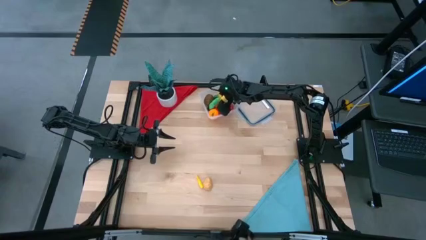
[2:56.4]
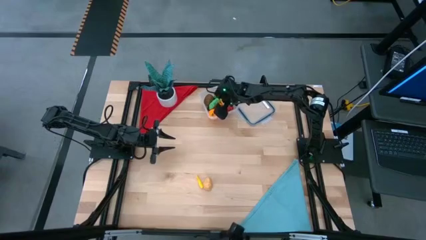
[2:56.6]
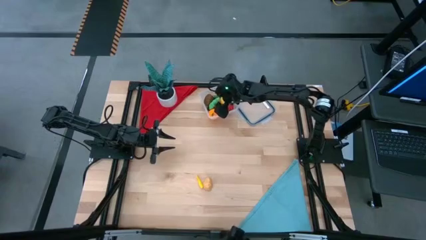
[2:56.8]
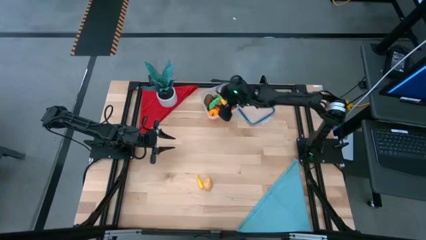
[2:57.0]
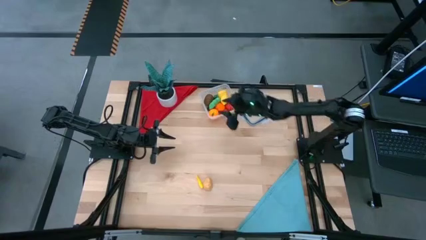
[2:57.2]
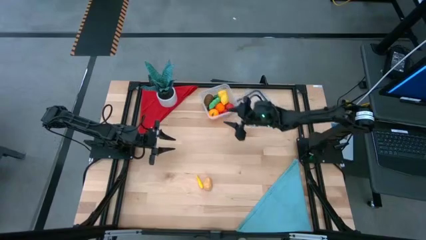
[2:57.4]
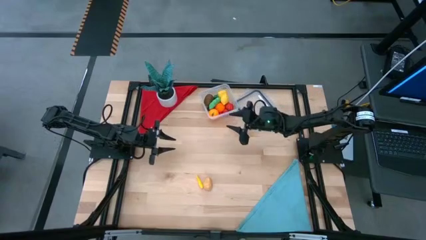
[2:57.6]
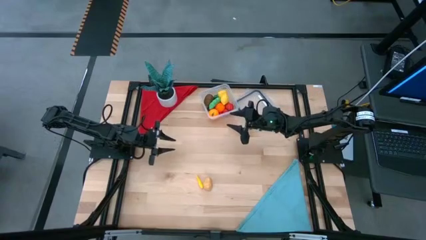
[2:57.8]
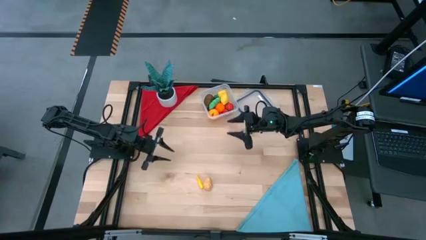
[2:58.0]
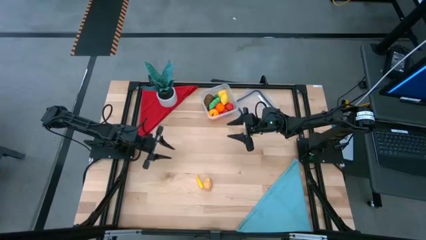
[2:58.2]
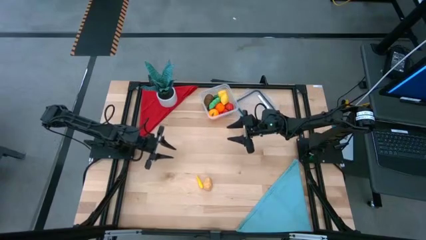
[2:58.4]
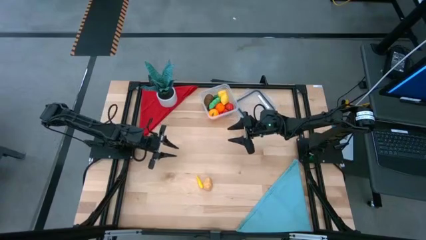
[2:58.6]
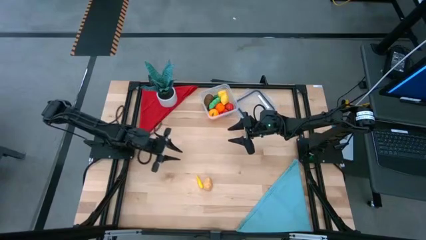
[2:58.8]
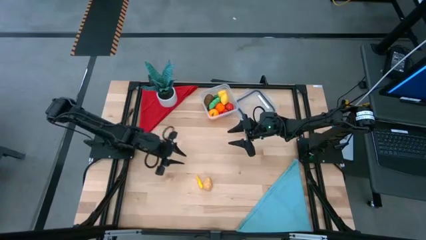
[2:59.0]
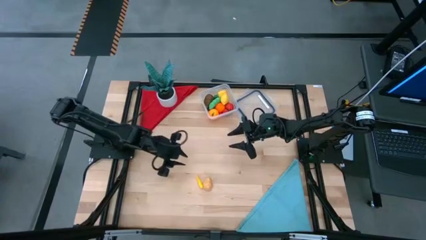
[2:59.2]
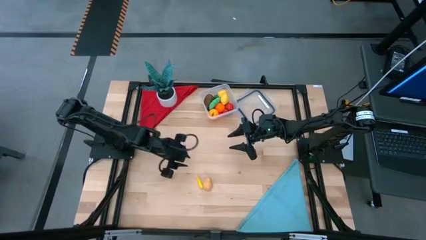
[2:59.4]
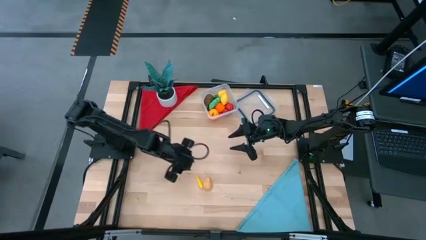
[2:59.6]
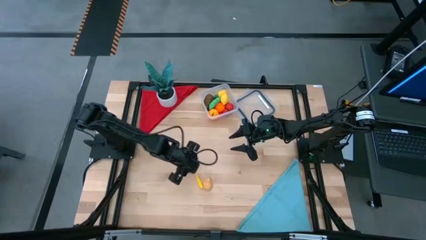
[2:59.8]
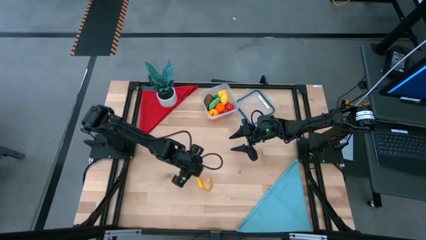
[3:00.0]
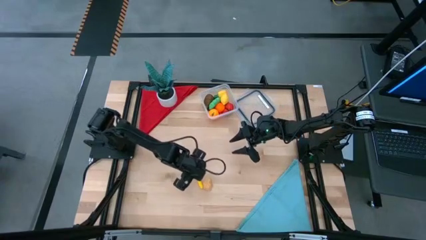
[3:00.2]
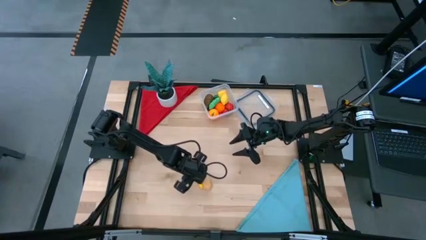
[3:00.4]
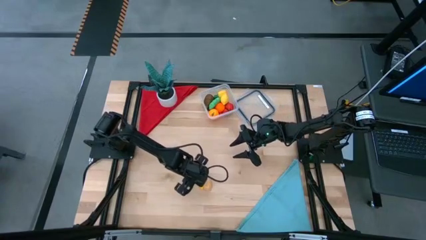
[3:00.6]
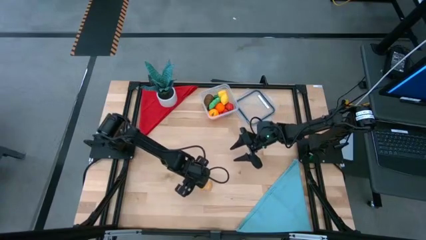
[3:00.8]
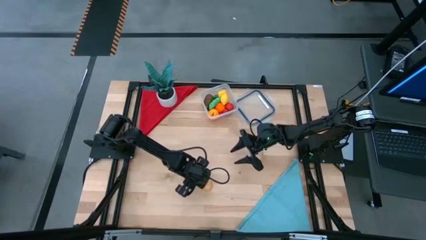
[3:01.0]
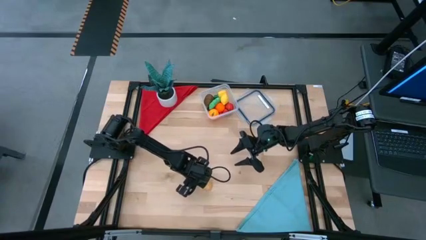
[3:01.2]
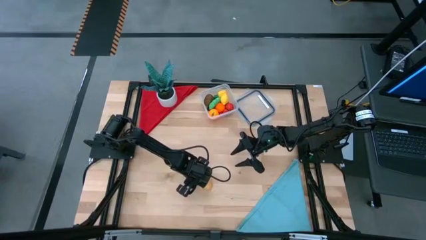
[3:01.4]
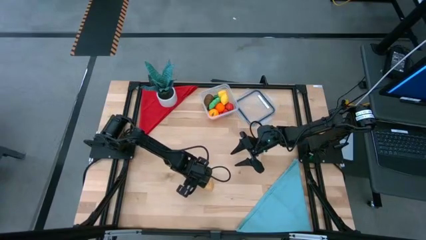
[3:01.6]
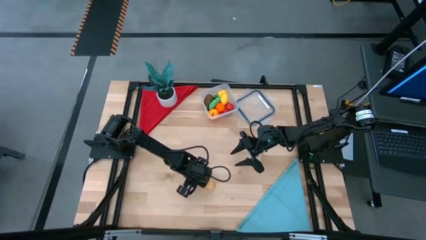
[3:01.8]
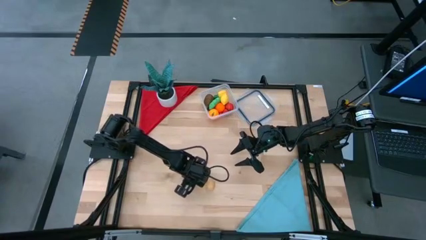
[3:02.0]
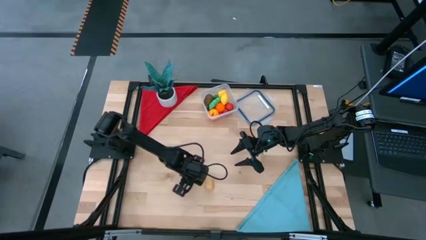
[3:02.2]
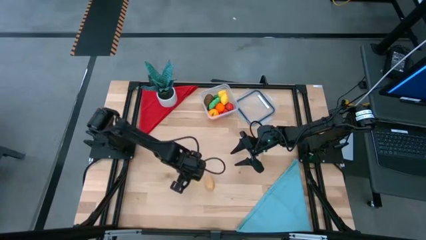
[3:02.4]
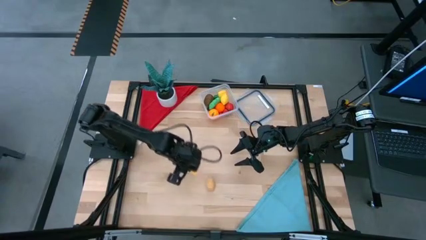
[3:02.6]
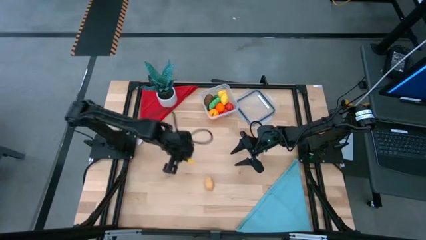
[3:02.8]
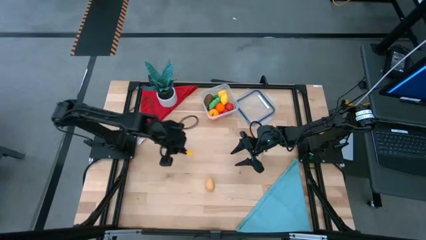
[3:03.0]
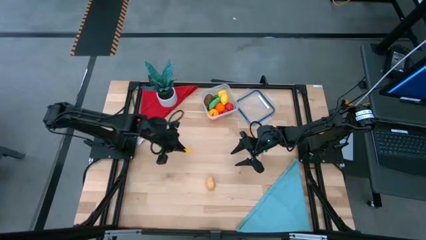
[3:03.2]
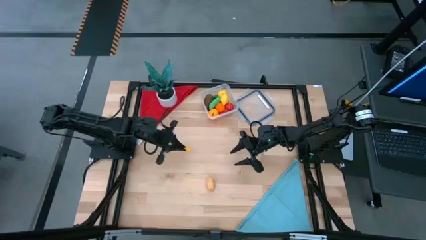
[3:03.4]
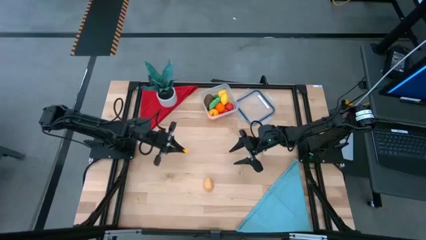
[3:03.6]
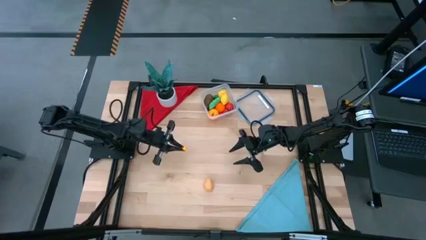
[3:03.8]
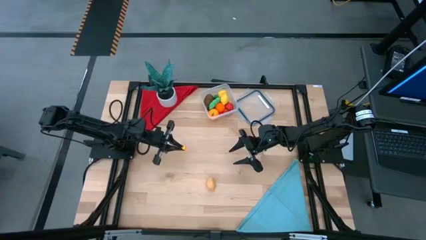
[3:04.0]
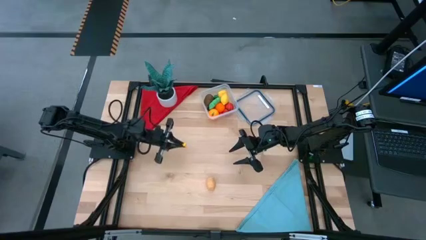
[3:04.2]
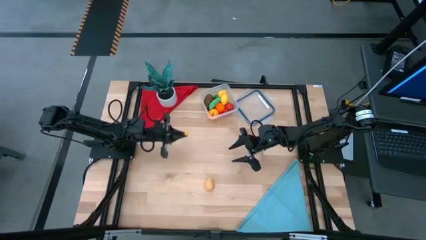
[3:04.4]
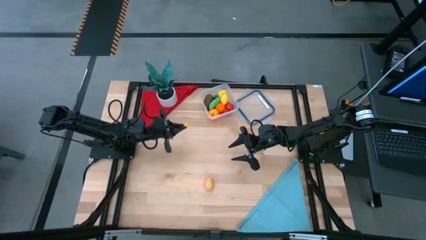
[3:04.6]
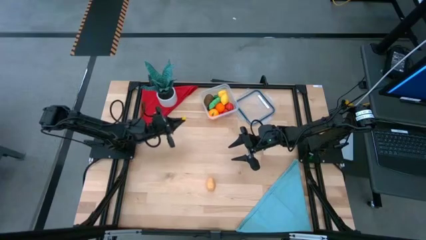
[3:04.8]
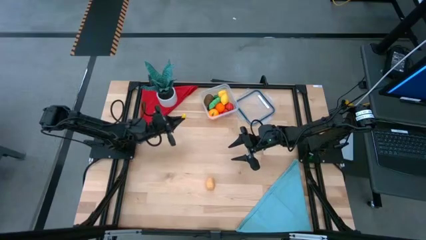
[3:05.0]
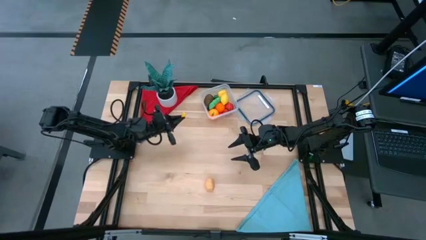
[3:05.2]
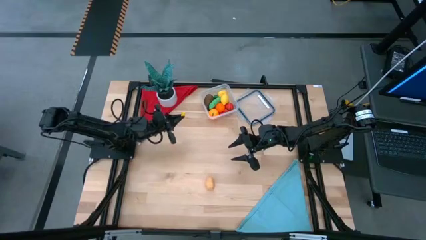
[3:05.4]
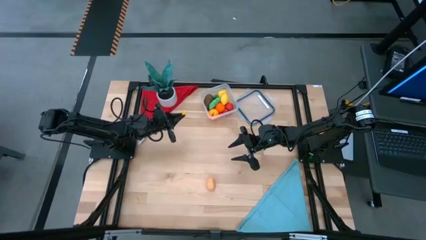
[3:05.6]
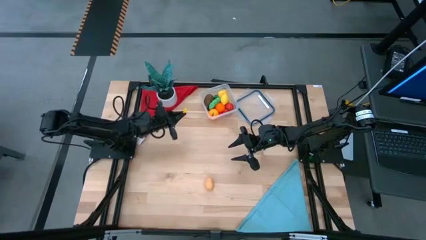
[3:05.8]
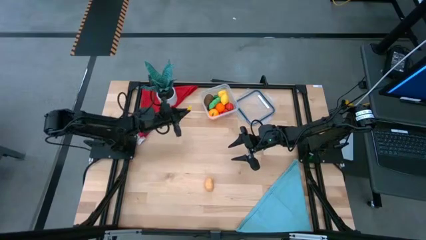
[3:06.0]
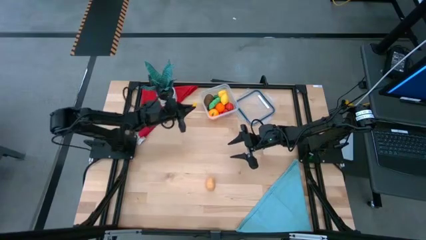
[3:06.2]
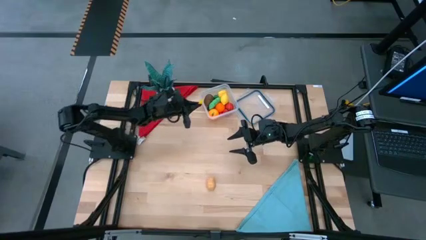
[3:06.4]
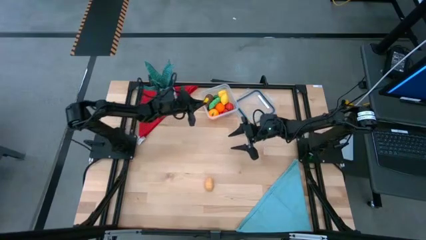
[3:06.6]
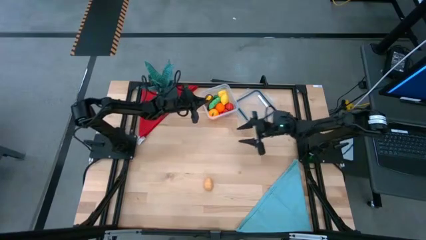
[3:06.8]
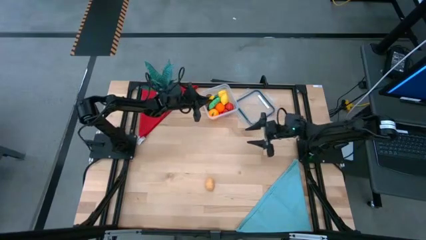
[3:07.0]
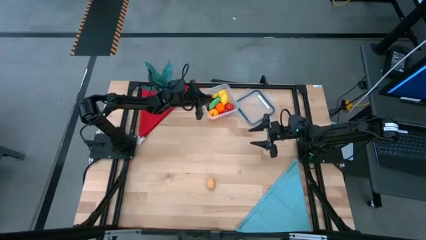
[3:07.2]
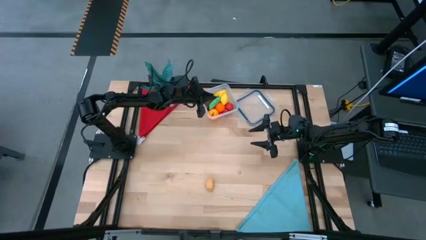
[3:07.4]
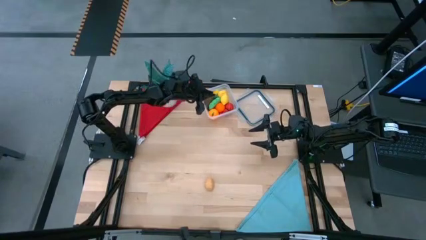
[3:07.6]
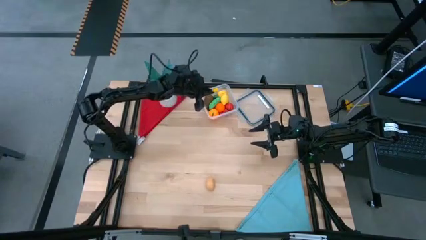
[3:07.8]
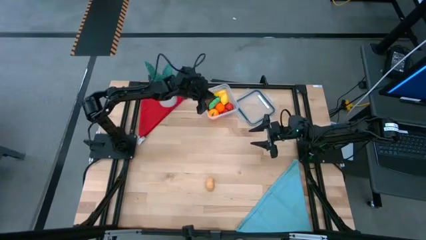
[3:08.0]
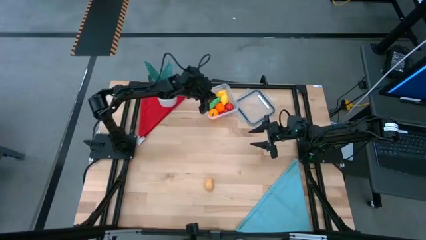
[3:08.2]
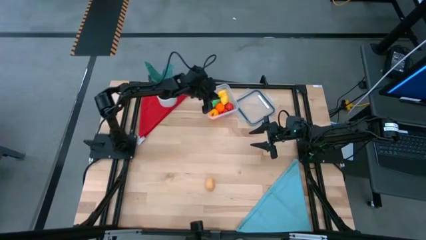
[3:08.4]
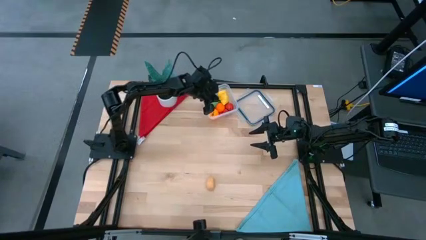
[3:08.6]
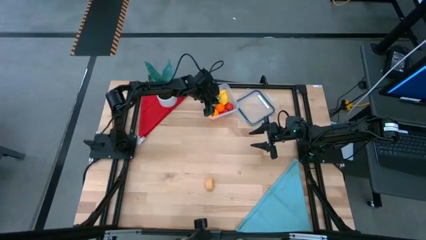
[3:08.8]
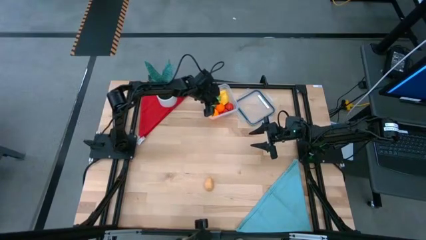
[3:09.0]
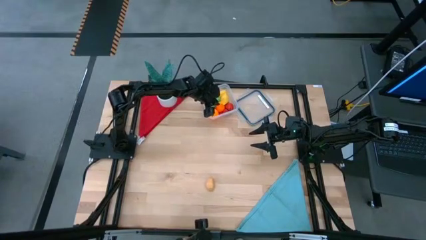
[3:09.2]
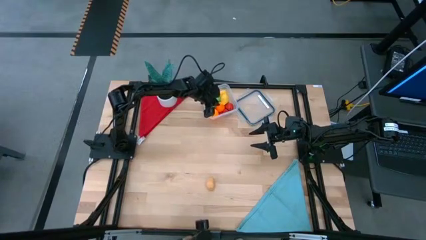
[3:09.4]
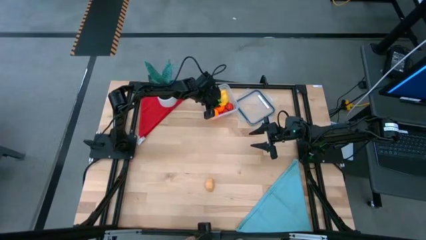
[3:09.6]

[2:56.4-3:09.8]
Task: Pick and placing Produce into tupperware
Put the yellow corn into the transparent container

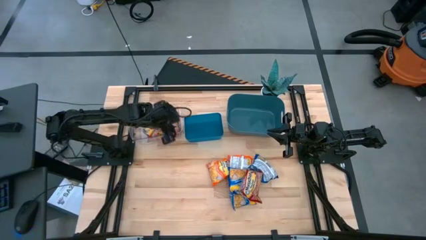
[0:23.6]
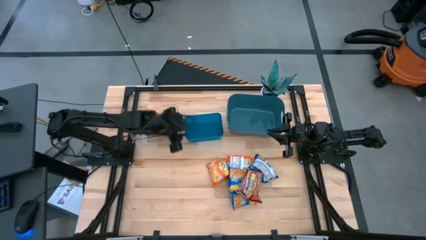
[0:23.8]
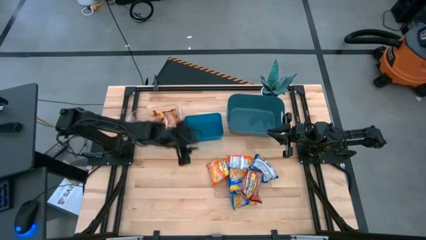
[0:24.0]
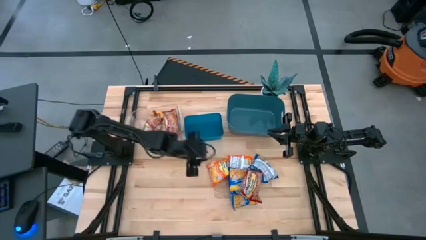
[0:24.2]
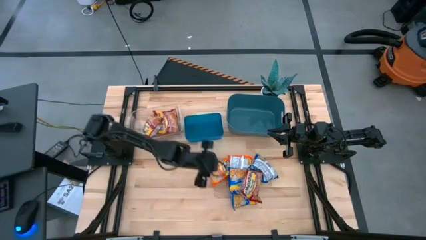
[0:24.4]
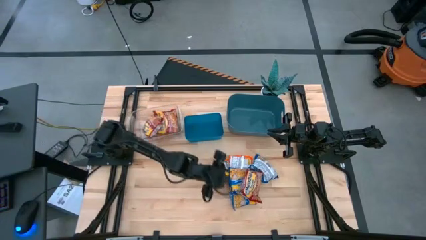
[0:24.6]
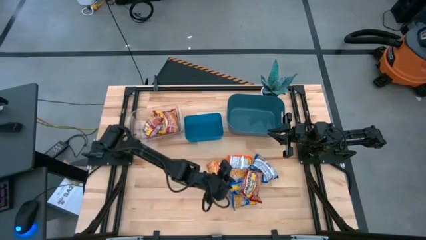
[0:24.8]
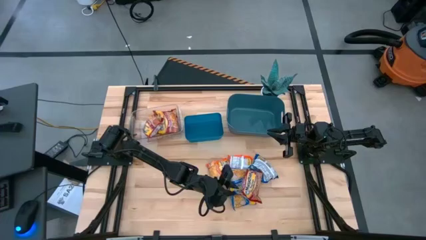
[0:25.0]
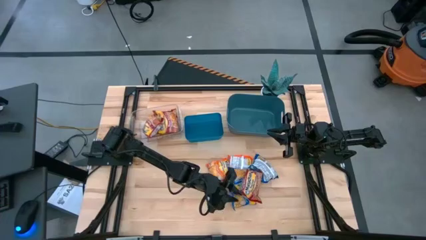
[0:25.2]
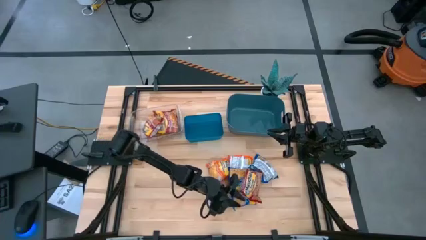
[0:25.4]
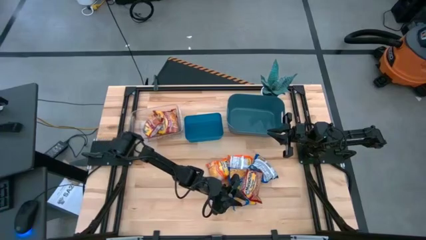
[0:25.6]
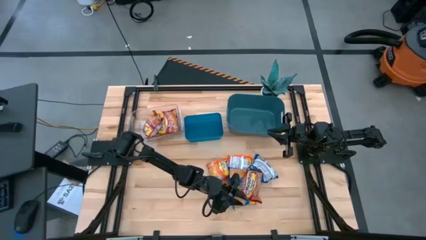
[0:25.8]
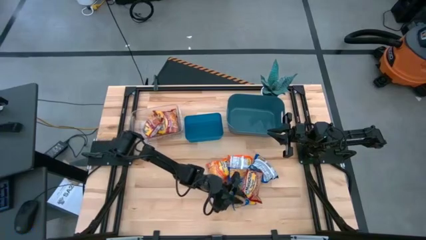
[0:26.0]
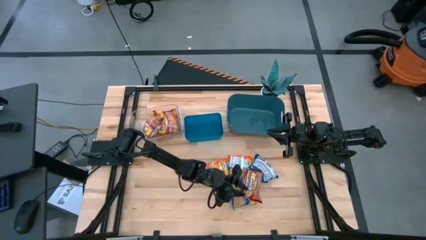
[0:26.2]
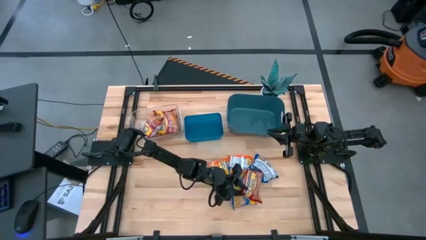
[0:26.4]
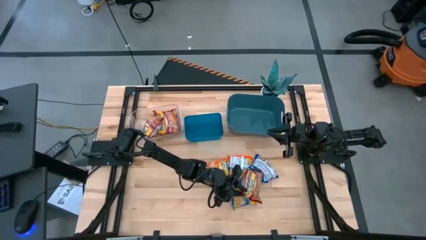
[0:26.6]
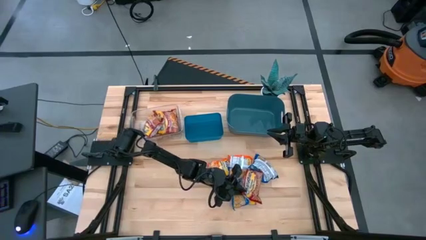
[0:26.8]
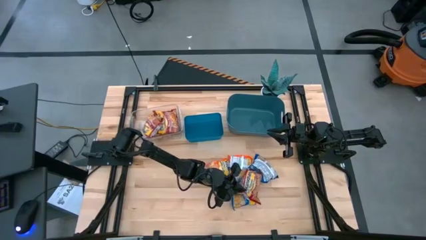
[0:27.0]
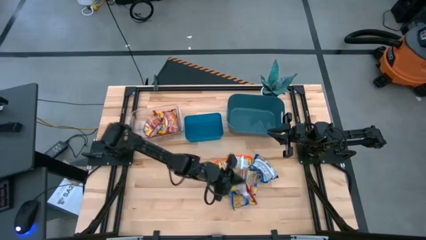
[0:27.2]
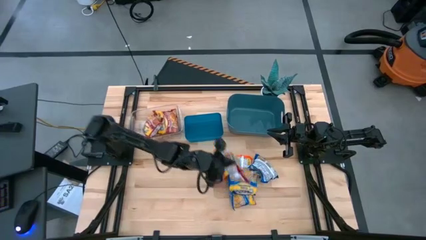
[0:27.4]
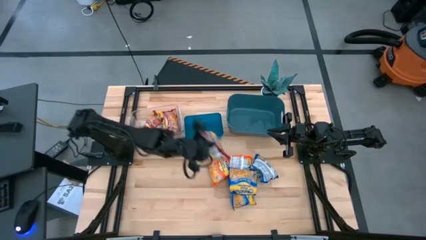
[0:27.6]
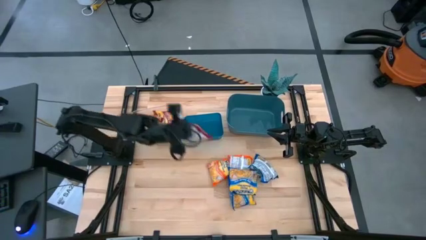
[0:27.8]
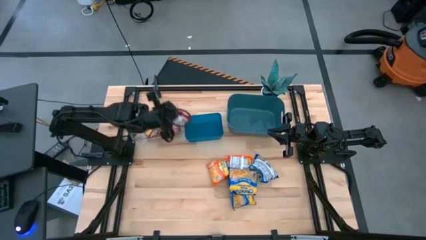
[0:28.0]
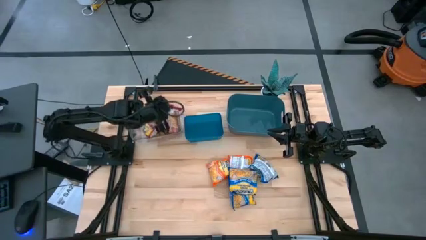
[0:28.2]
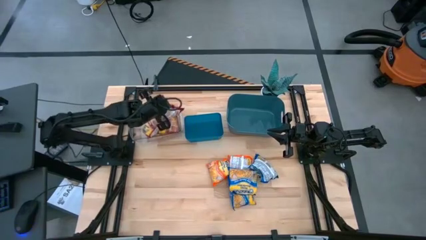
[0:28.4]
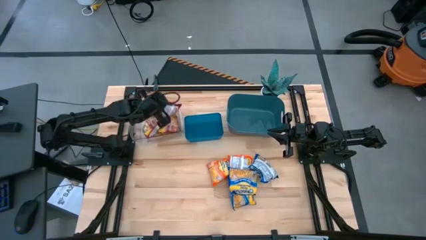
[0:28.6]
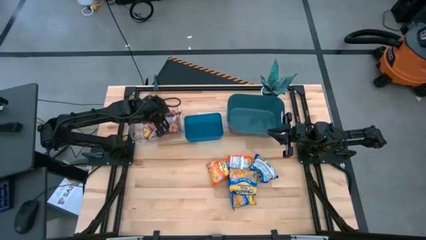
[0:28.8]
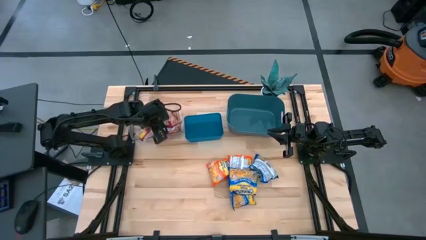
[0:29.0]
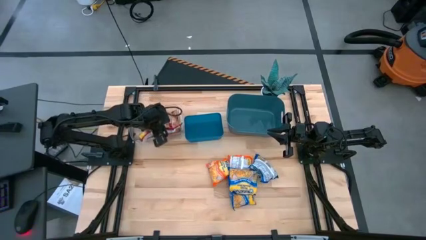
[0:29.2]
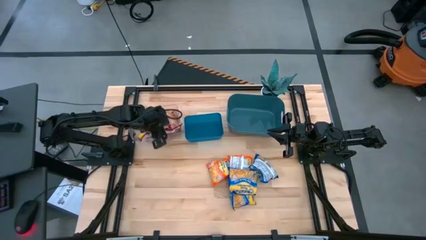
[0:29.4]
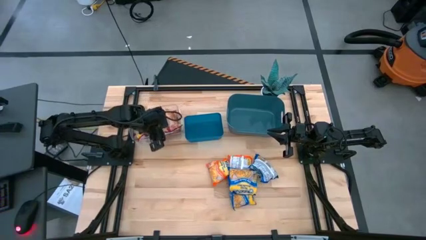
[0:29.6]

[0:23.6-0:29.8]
Task: Sort Maruchan noodles
Put the red noodle pack into the transparent bin
